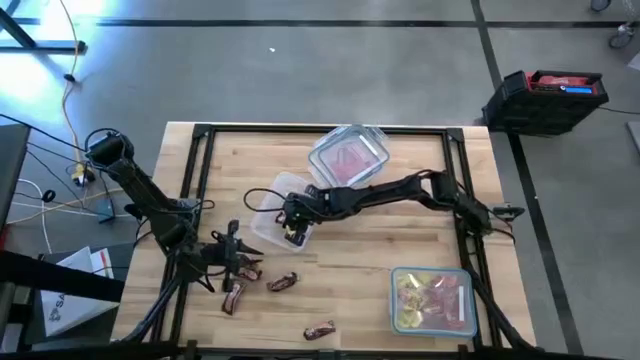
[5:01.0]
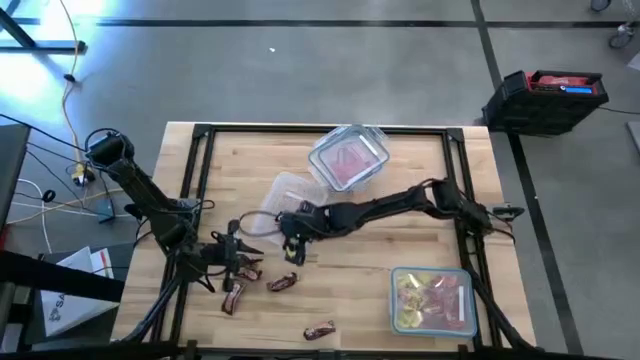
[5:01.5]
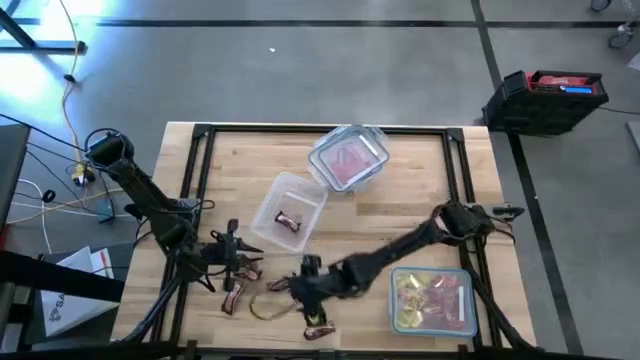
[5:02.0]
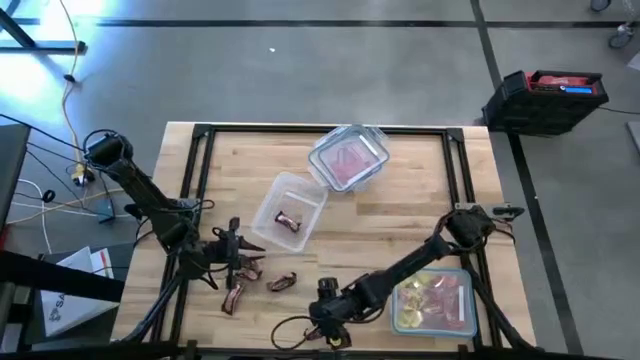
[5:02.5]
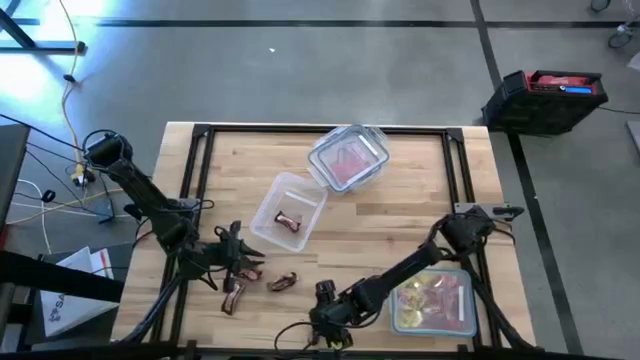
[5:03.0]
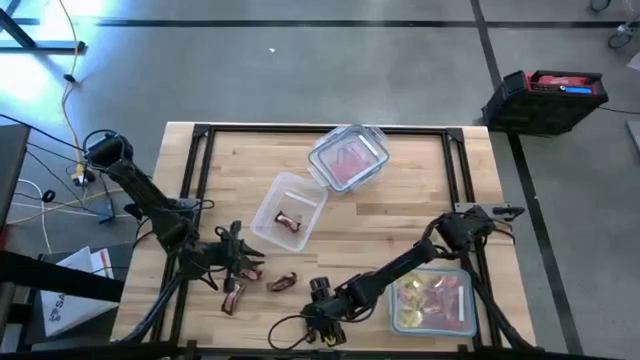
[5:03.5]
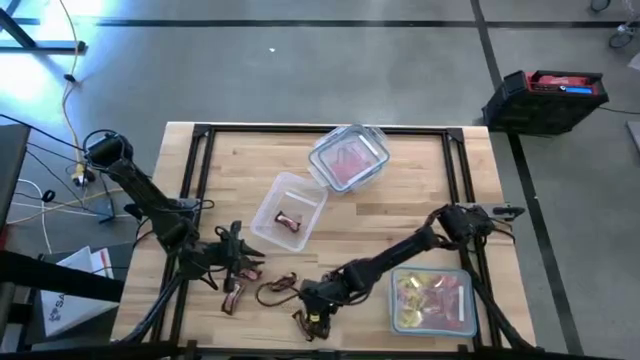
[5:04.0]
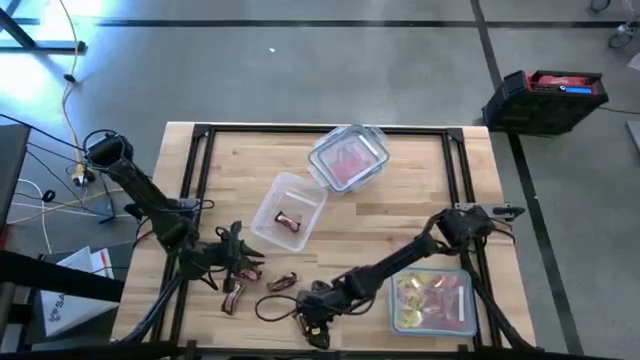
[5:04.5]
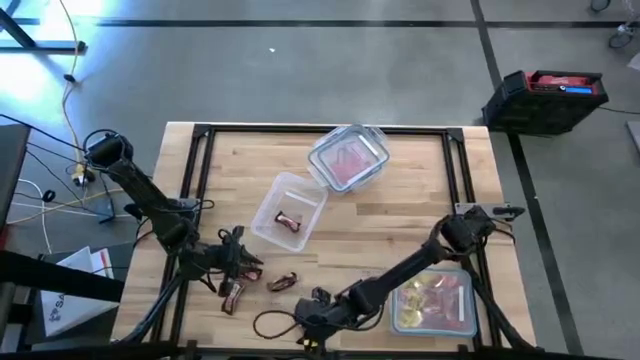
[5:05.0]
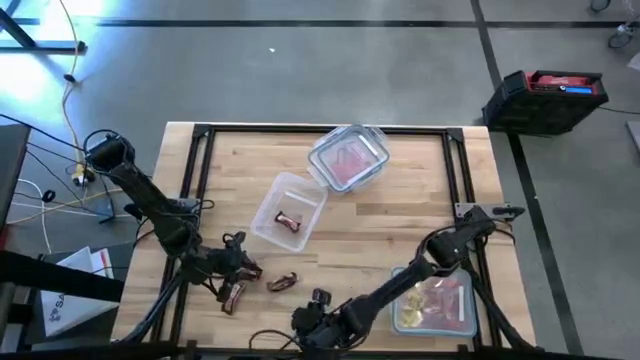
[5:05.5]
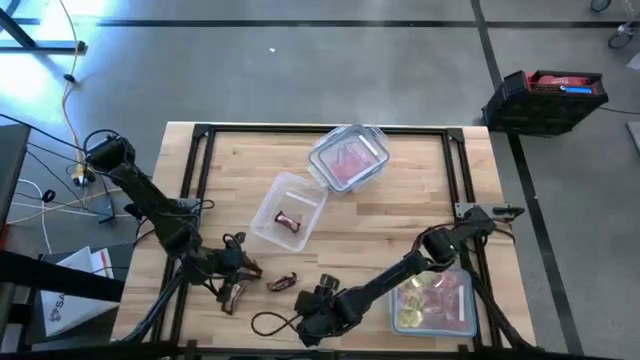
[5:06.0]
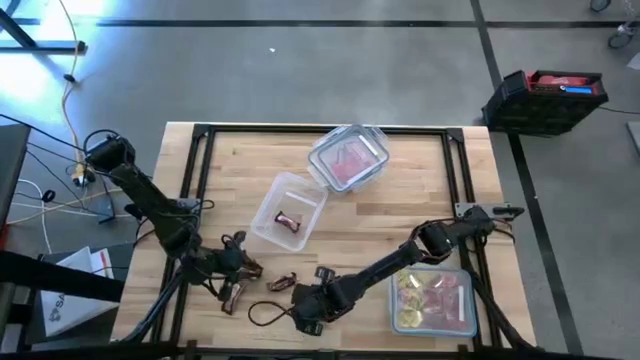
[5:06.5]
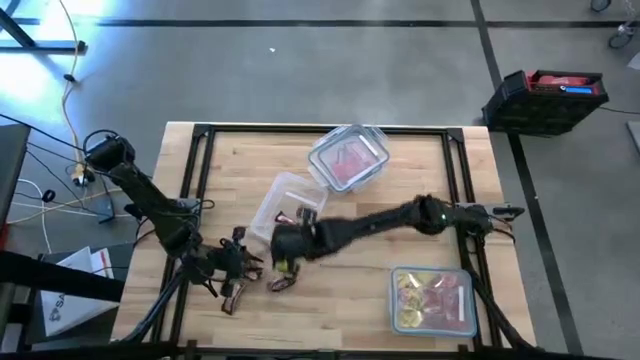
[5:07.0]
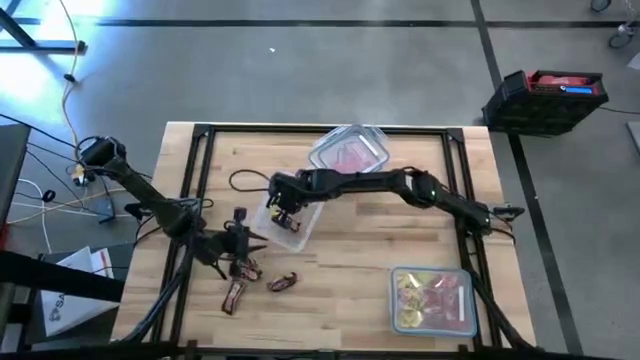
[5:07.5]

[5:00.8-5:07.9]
Task: Sort candy
Put the brown chocolate bar into the transparent bin

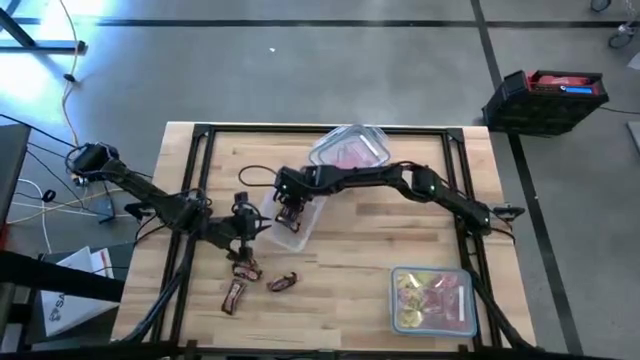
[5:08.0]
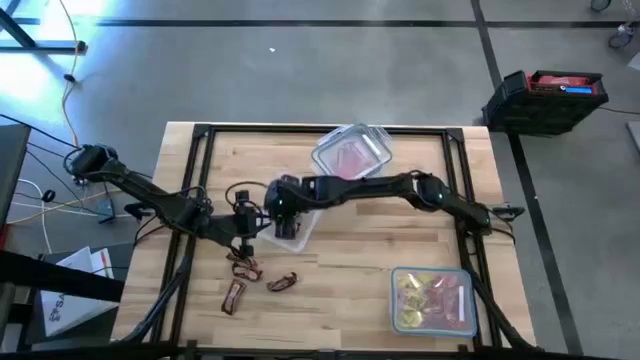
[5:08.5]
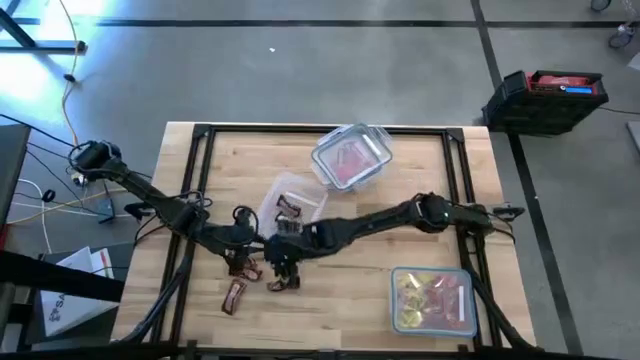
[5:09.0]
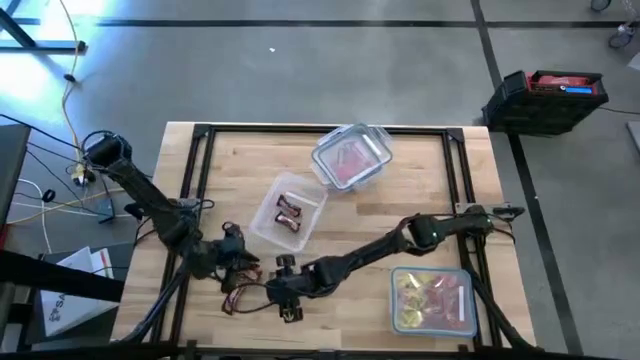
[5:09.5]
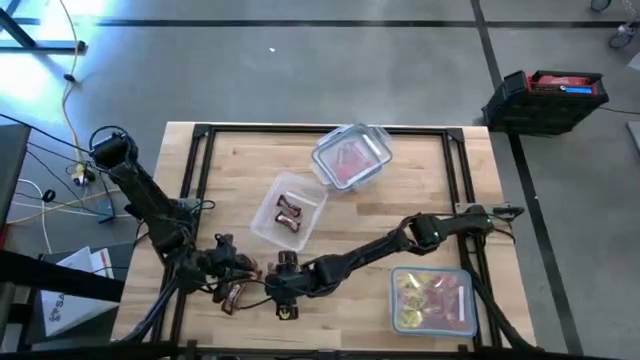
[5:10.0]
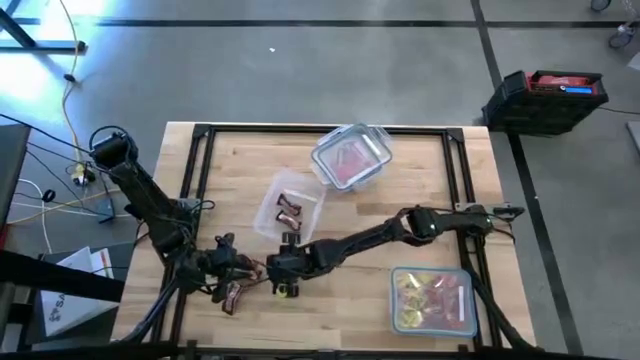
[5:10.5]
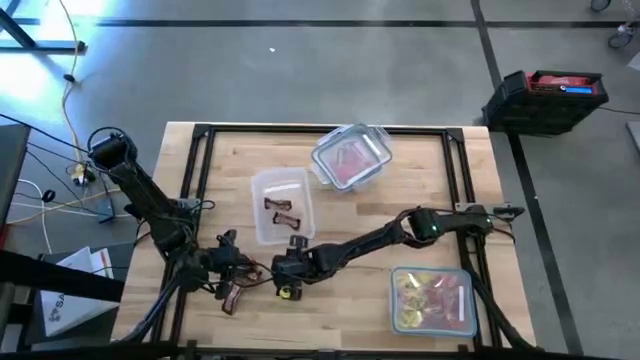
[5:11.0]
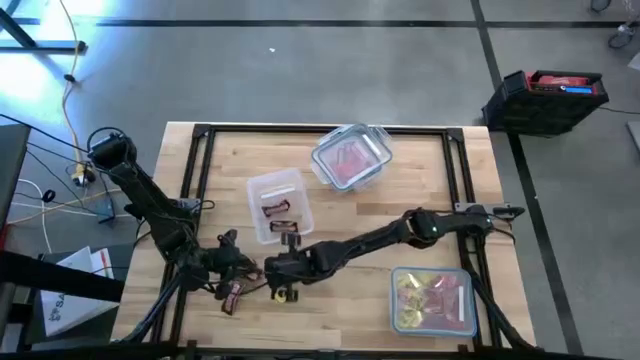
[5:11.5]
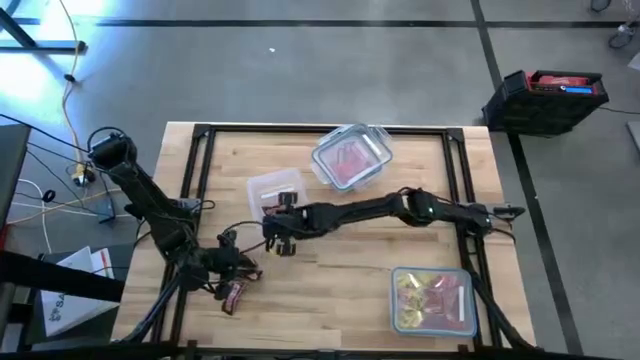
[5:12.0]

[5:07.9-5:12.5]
Put the brown chocolate bar into the transparent bin

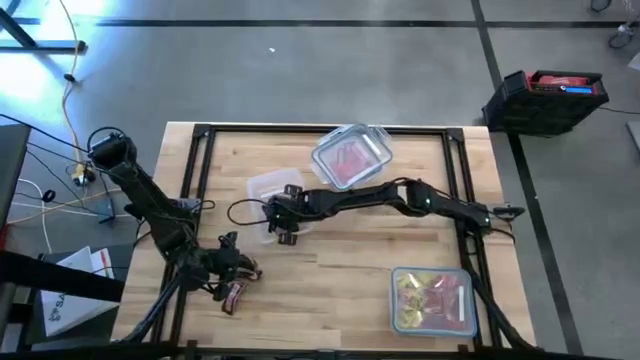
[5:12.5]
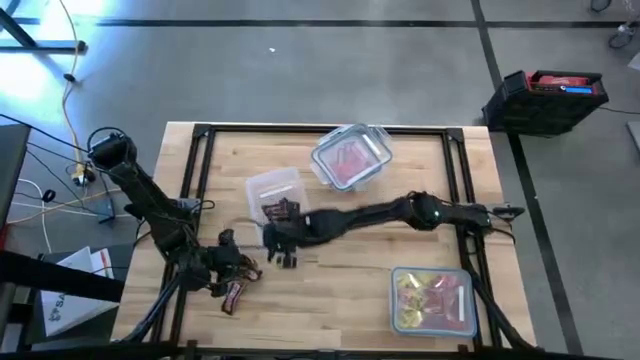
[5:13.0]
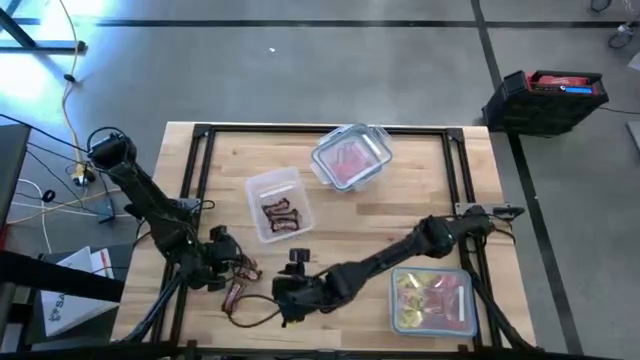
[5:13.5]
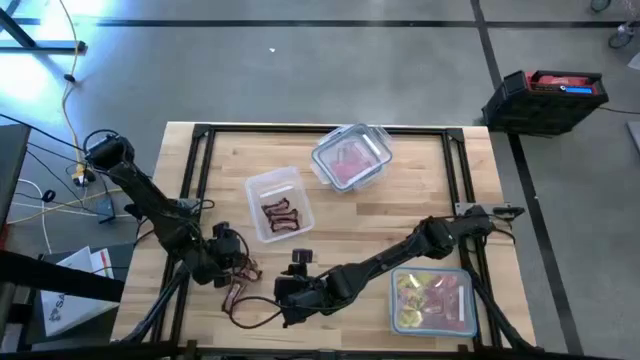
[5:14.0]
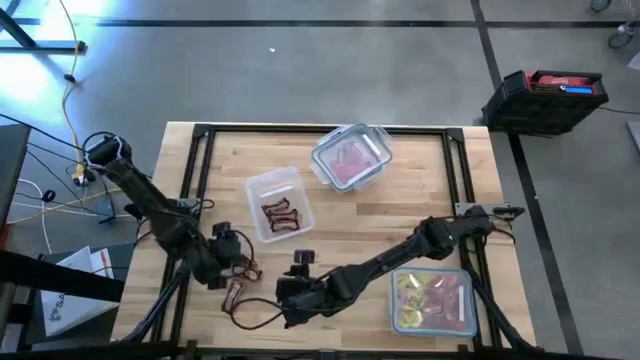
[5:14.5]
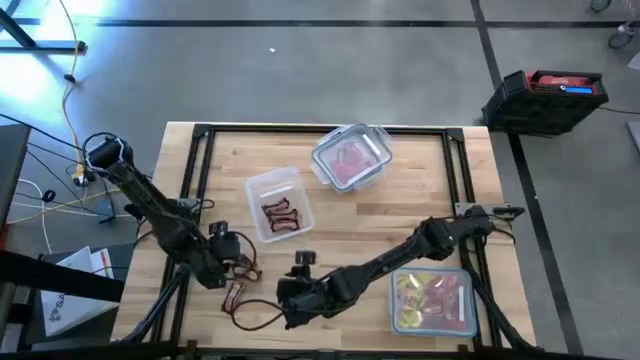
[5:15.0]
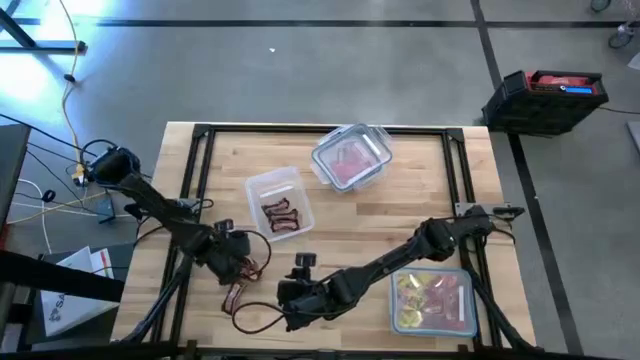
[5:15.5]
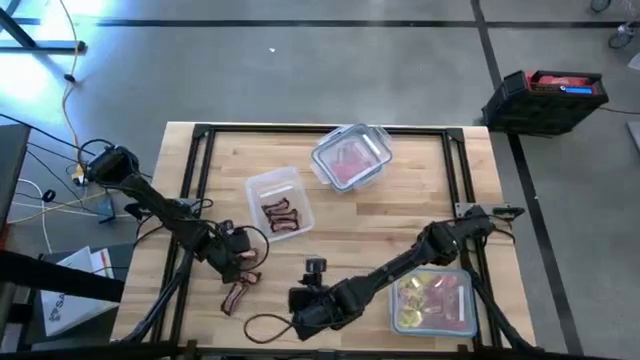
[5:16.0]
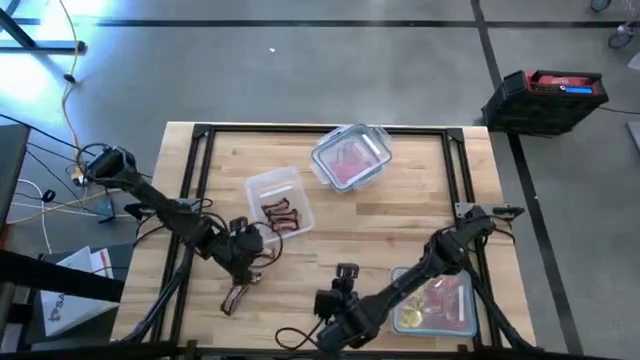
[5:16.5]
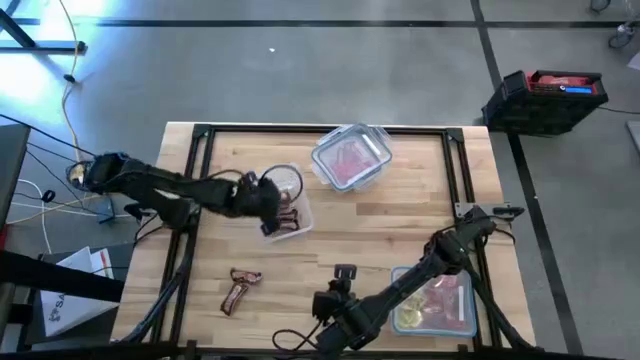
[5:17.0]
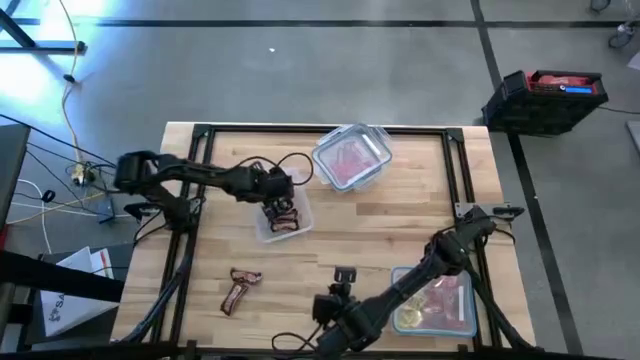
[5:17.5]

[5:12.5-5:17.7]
Put the brown chocolate bar into the transparent bin

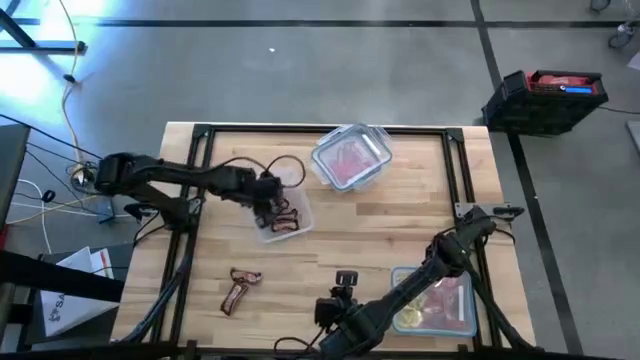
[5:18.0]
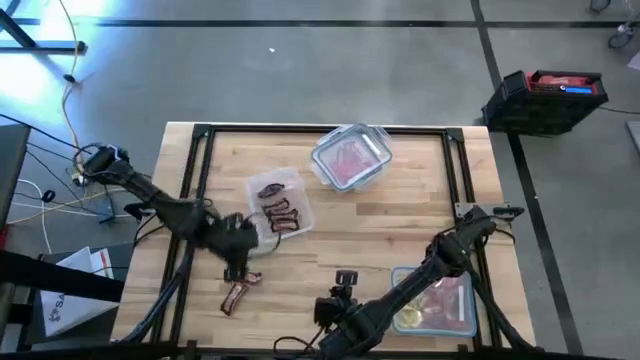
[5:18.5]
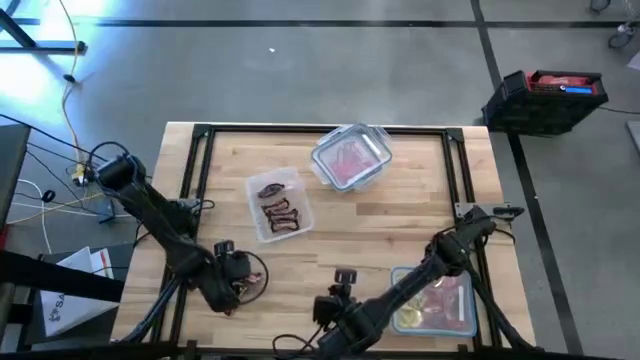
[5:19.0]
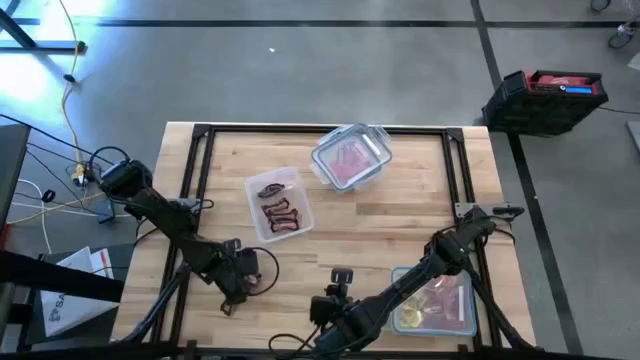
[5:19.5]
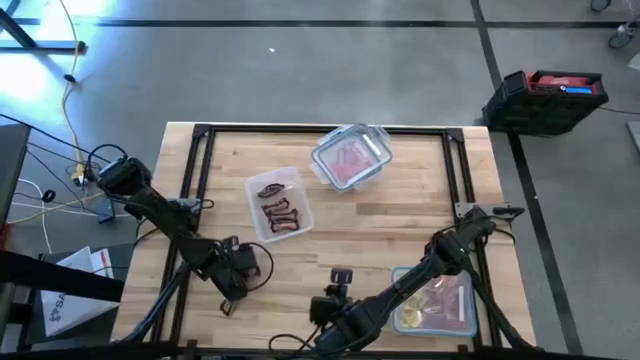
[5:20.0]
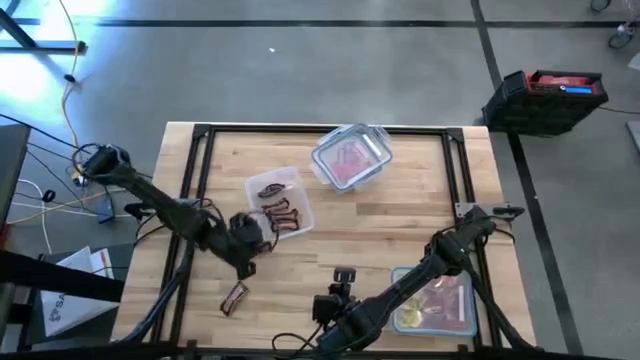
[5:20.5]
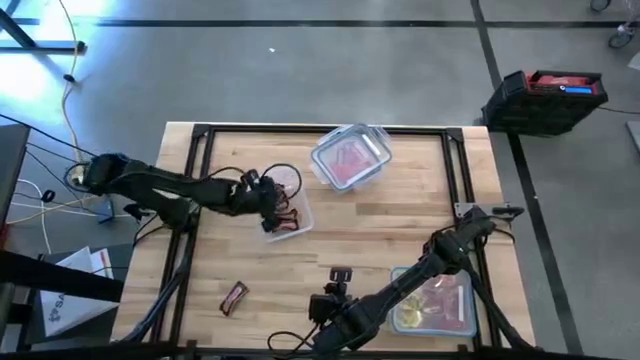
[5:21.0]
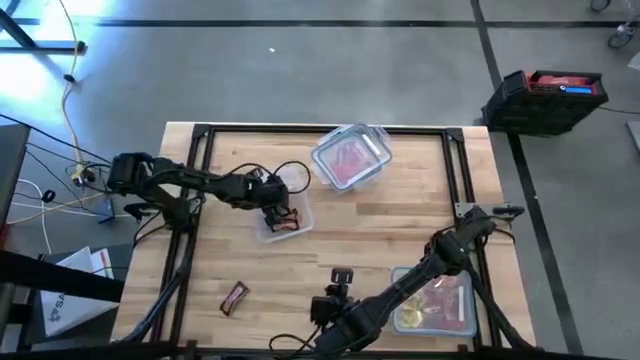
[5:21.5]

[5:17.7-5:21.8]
Put the brown chocolate bar into the transparent bin
